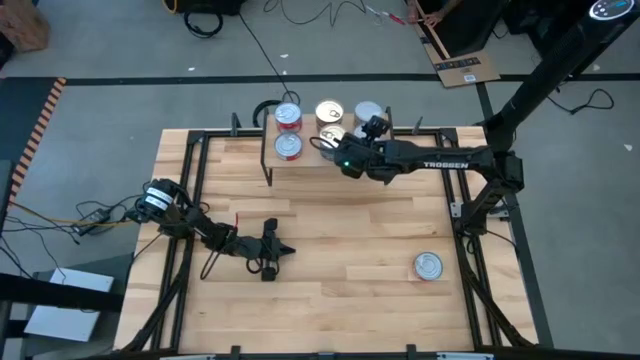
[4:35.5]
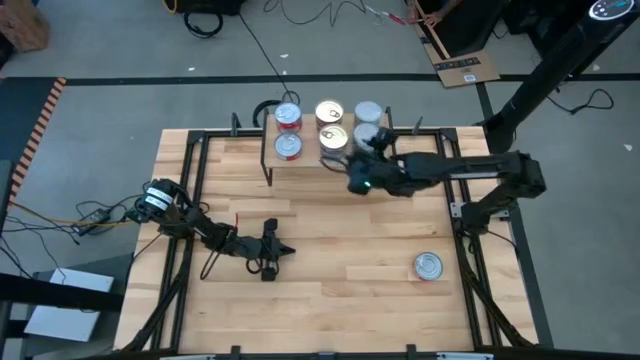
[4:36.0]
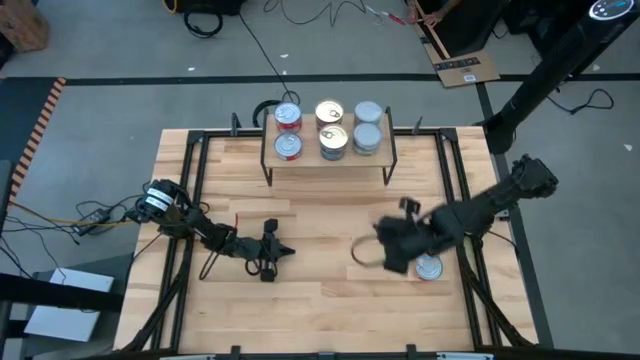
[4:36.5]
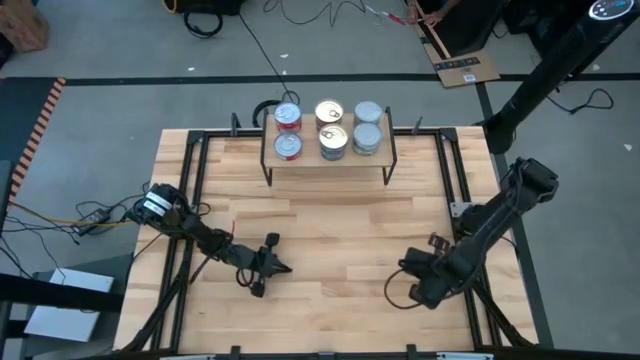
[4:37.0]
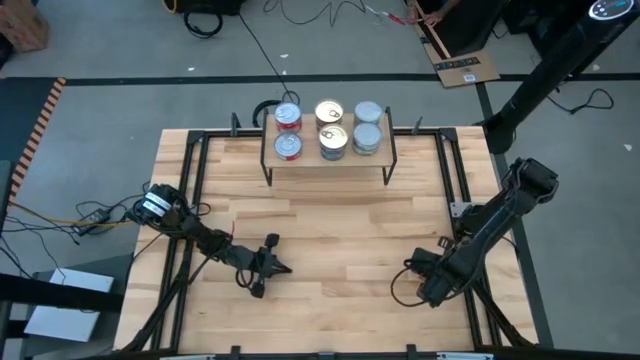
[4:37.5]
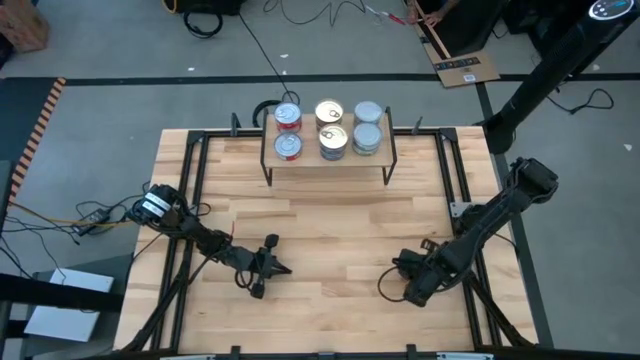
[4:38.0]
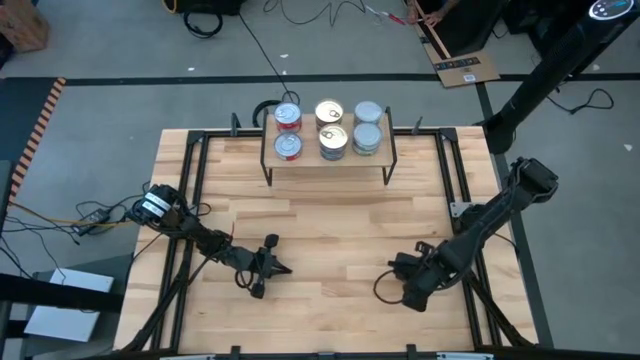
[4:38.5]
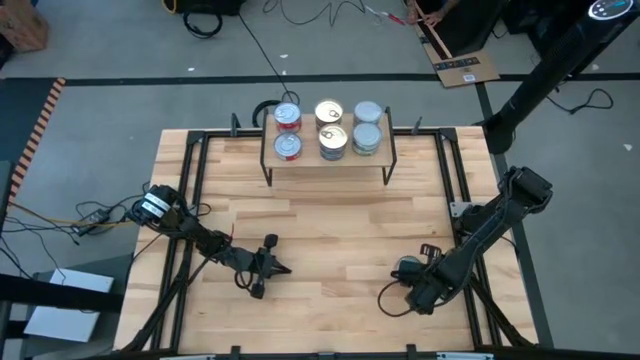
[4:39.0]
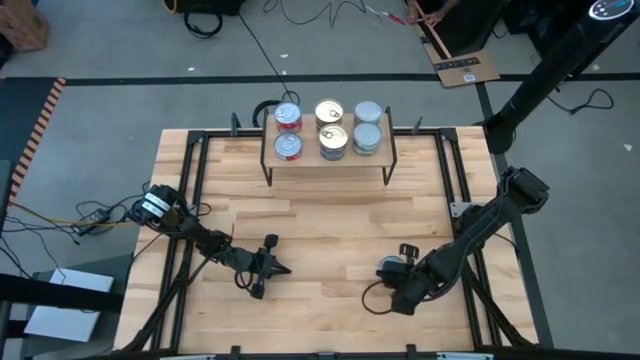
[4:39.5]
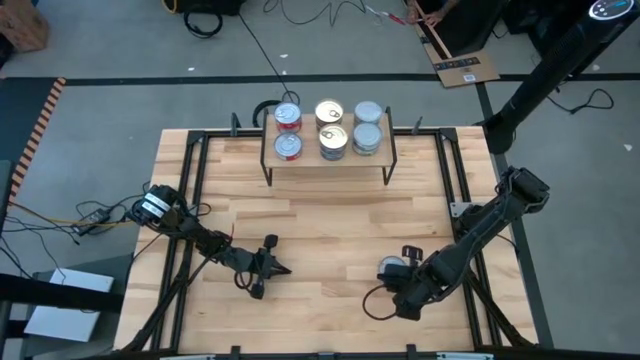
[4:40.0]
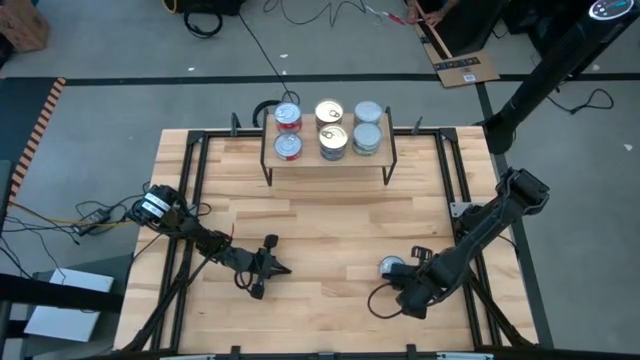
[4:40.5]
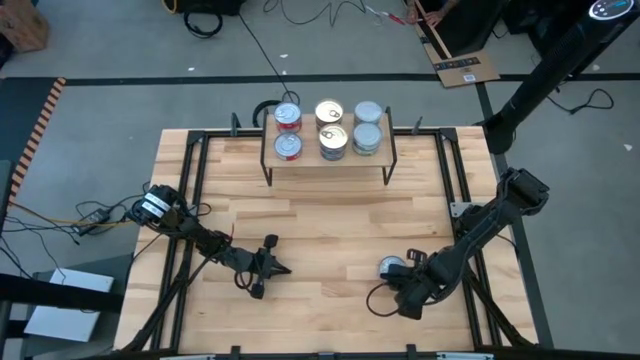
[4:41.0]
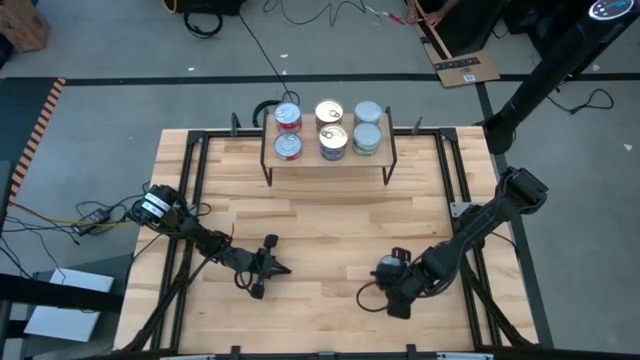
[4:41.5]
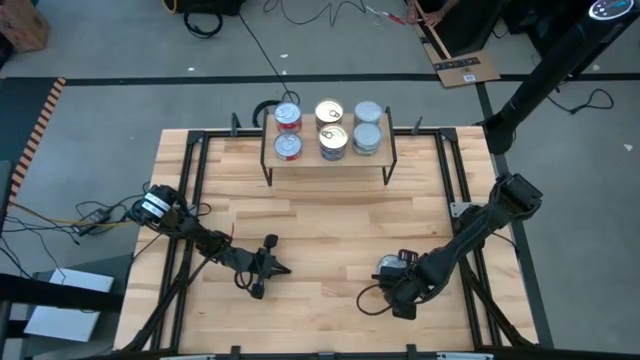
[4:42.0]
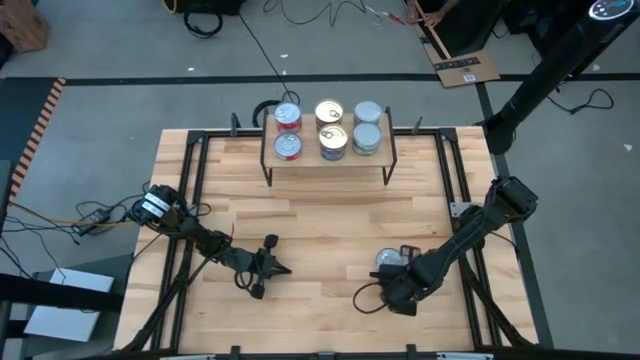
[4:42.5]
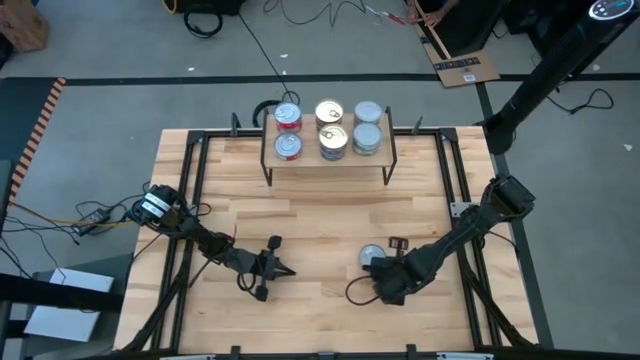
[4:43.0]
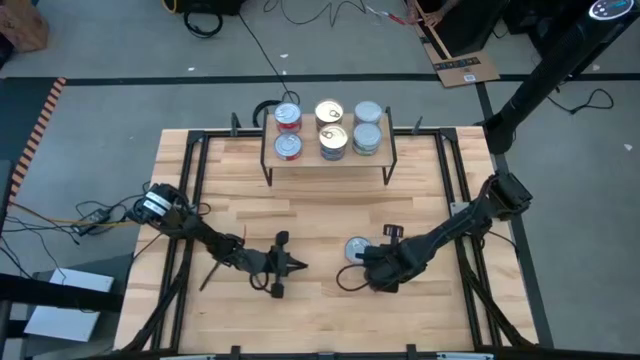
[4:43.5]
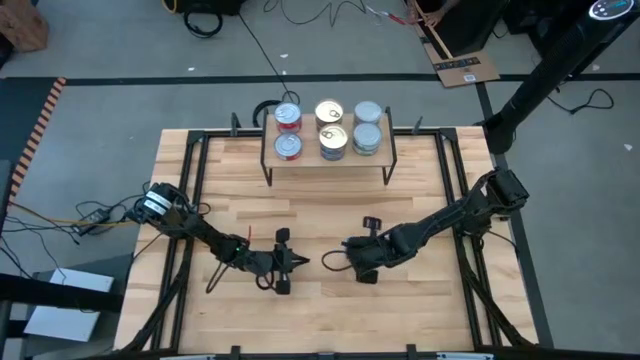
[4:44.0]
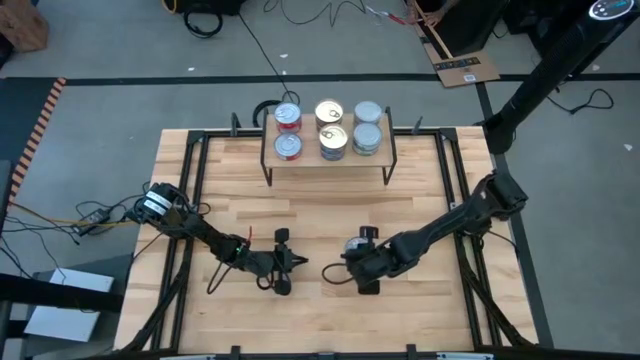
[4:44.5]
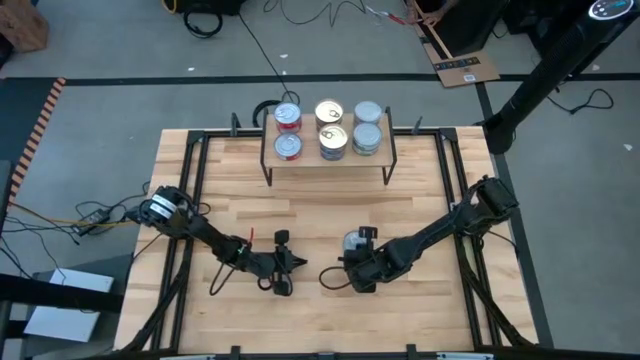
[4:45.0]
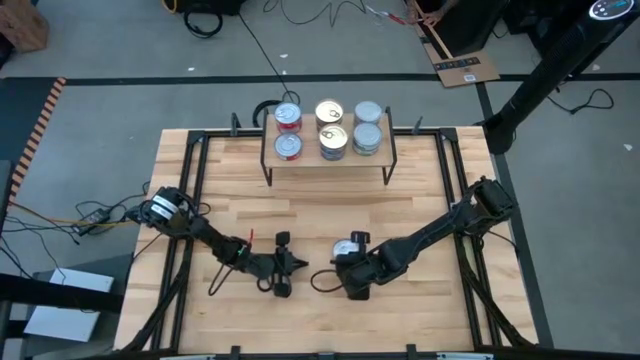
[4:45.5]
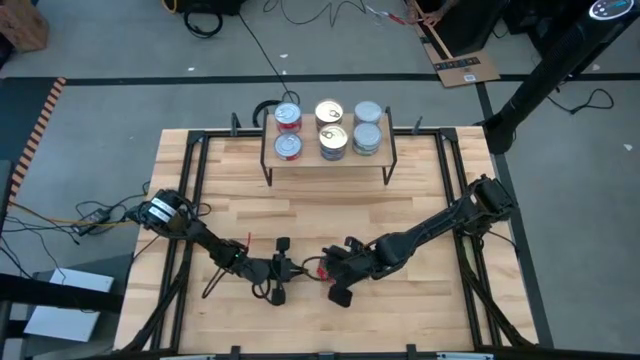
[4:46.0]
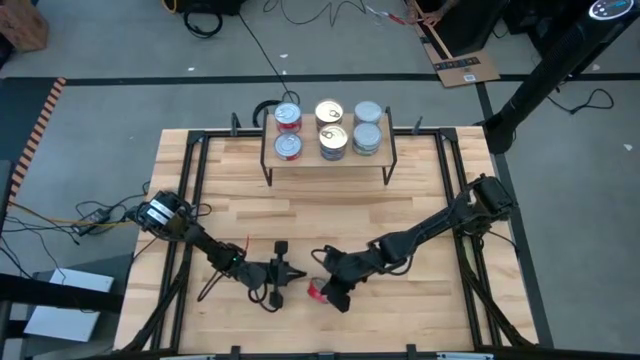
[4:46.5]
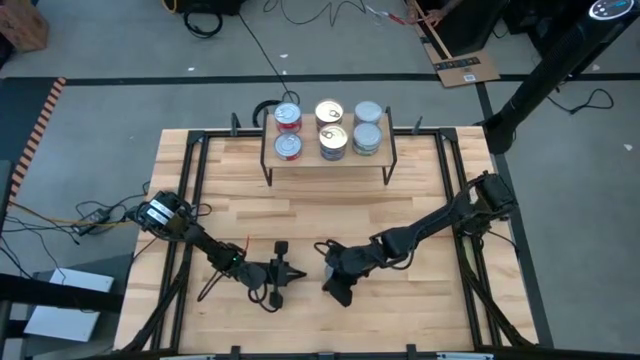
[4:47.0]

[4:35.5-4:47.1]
Task: Stack canned seafood by type on shelf
Stack the red tuna can on top of the red tuna can on the shelf

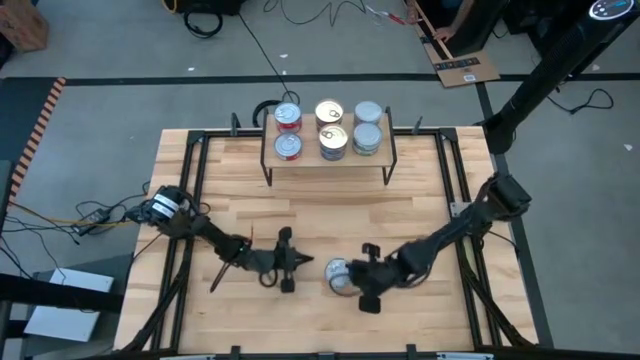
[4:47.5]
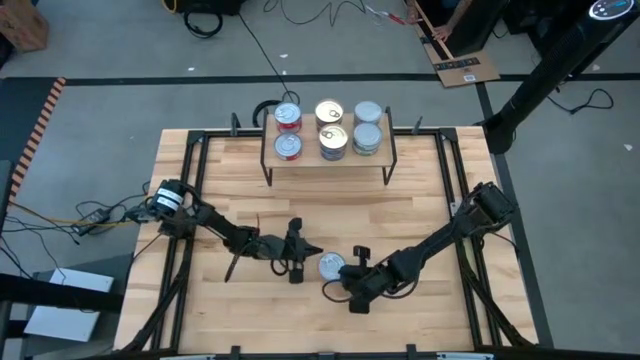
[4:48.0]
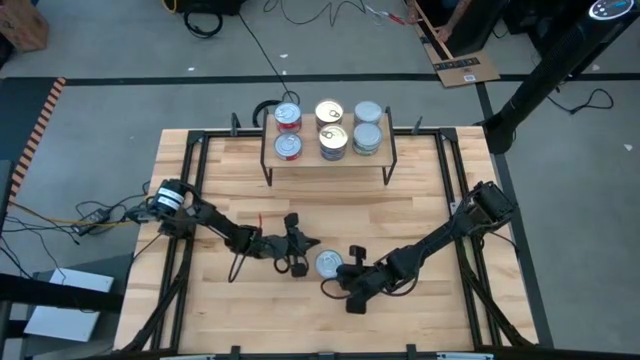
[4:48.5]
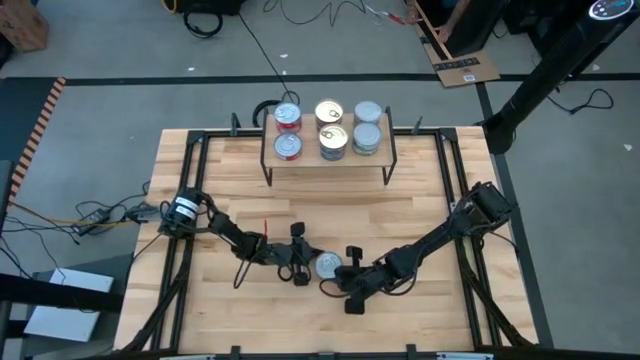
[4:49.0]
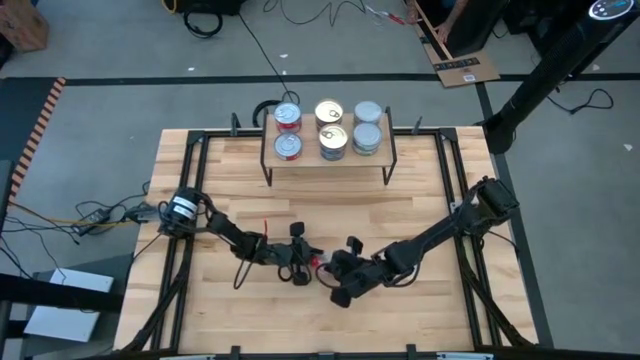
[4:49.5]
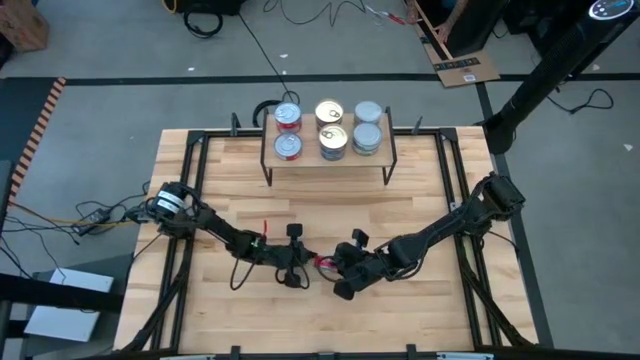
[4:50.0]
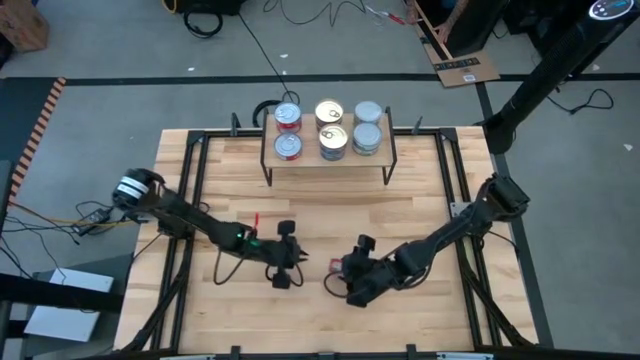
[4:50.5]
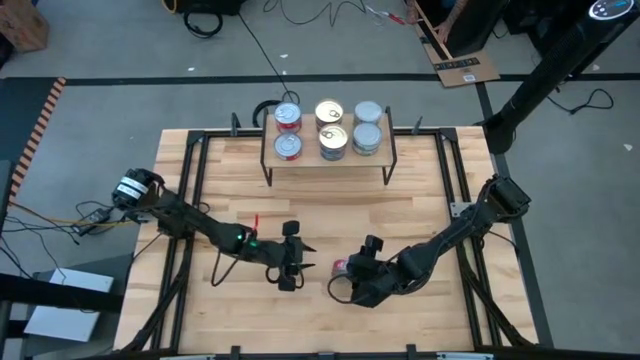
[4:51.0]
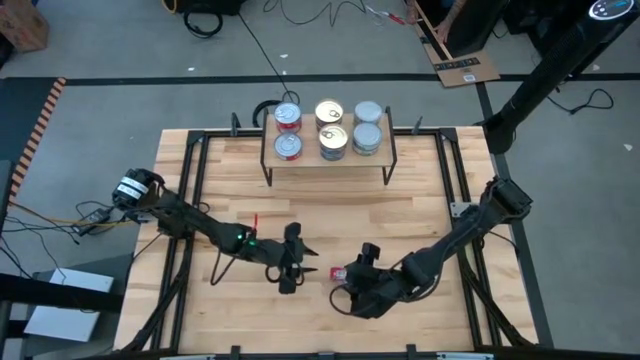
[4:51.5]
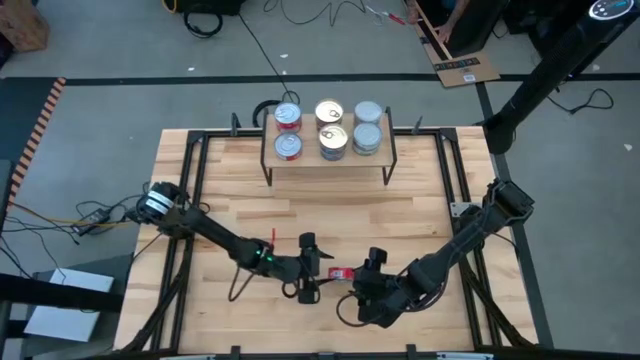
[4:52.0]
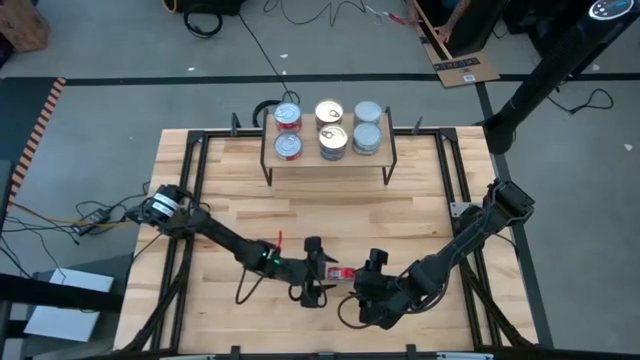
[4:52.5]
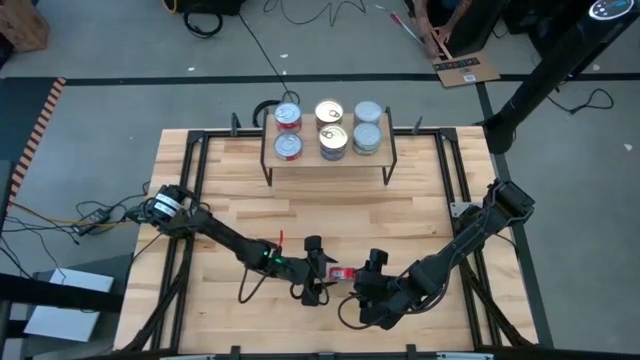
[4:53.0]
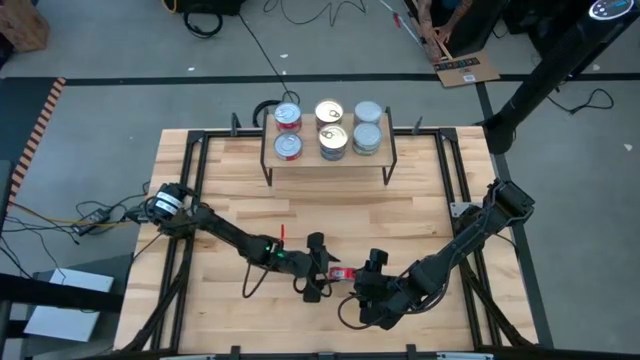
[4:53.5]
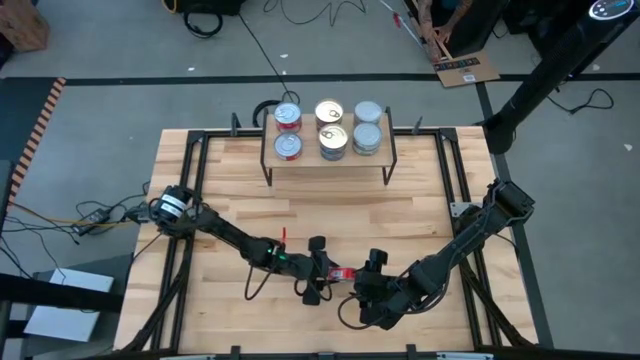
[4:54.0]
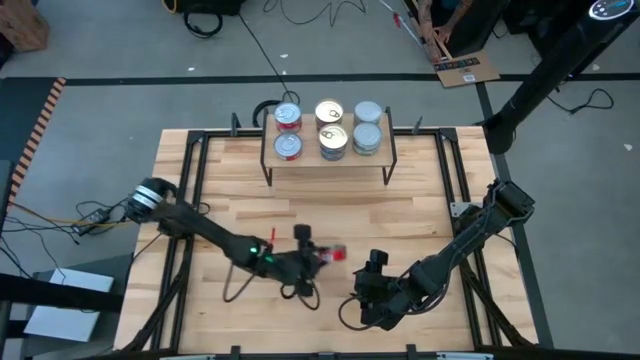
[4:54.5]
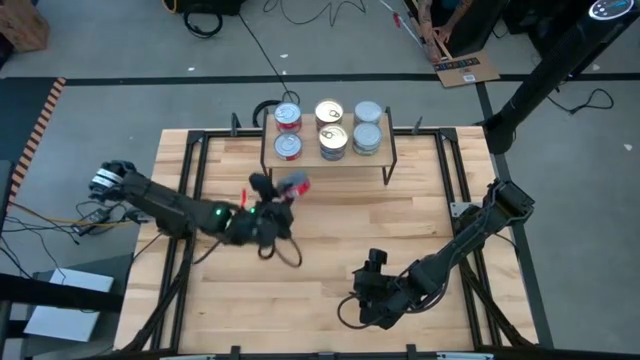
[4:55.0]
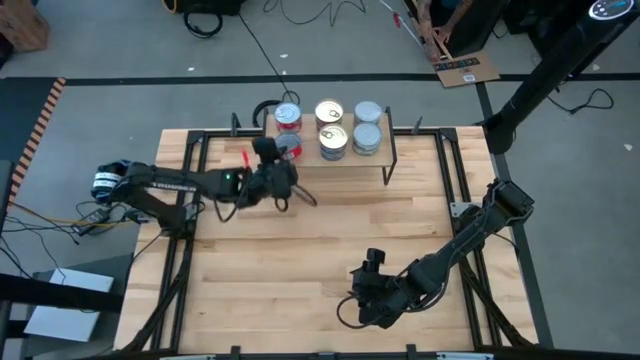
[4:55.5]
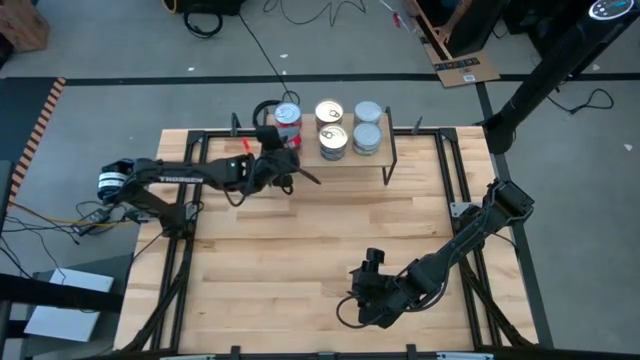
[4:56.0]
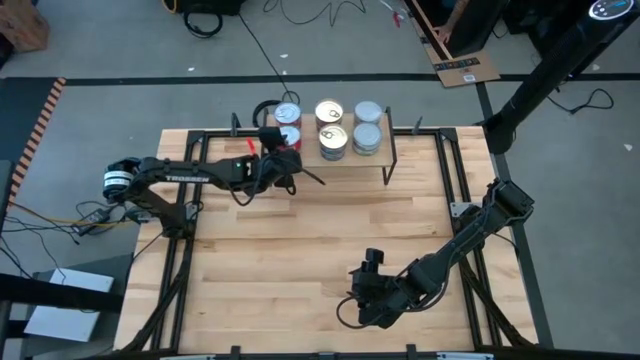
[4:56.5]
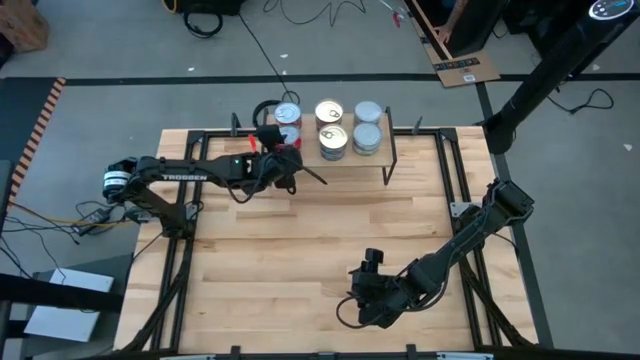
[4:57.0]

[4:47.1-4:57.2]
Stack the red tuna can on top of the red tuna can on the shelf
